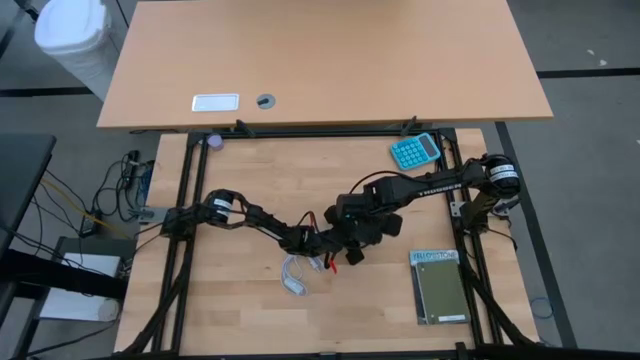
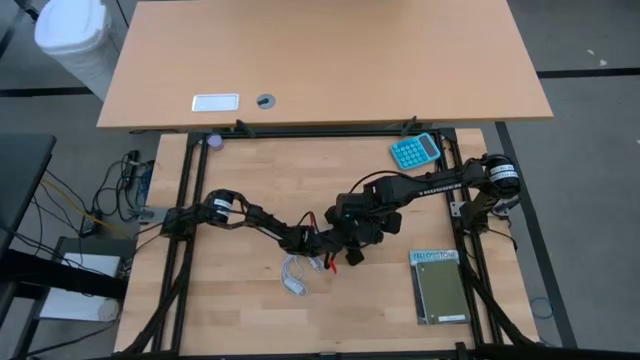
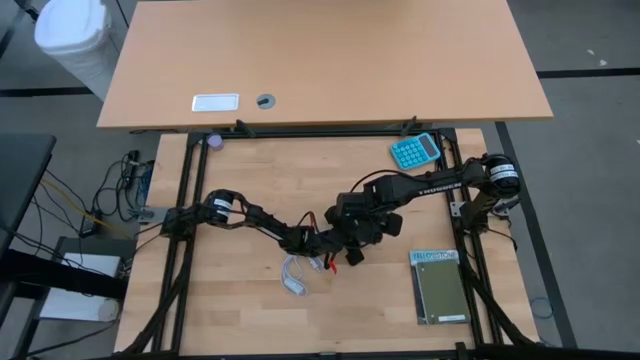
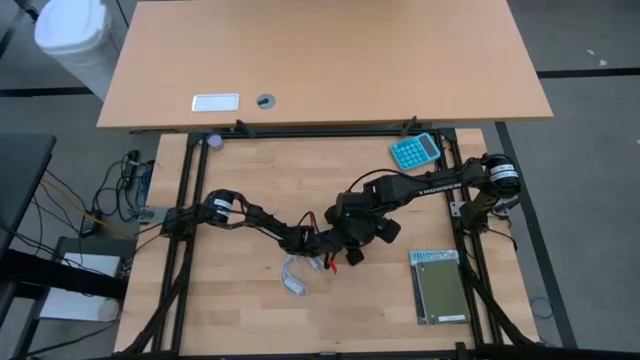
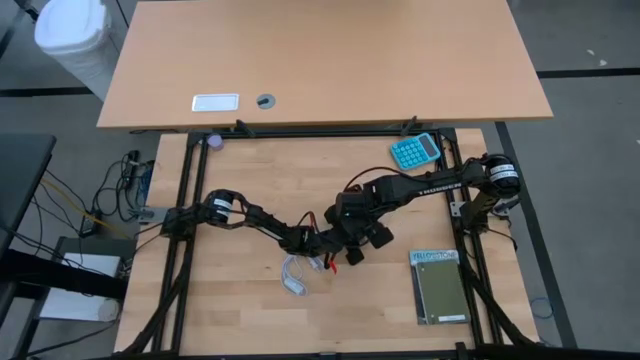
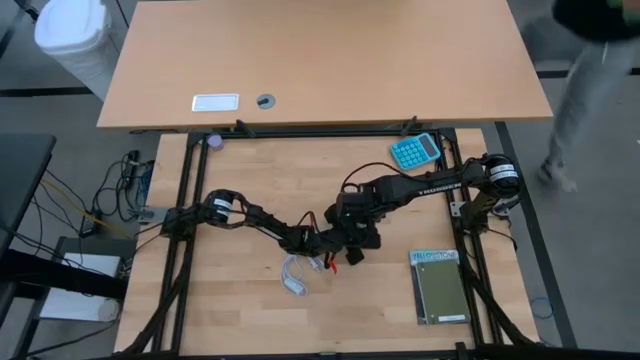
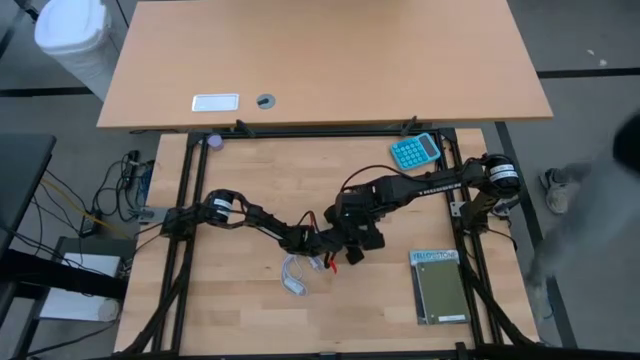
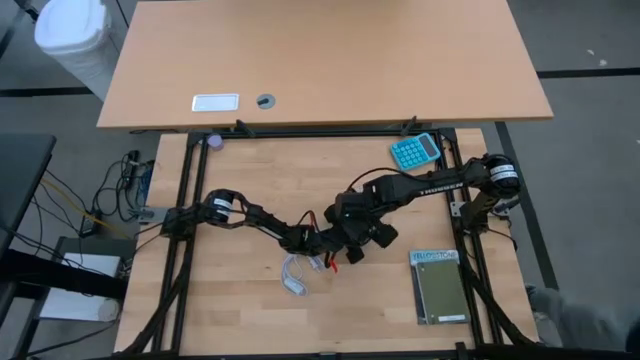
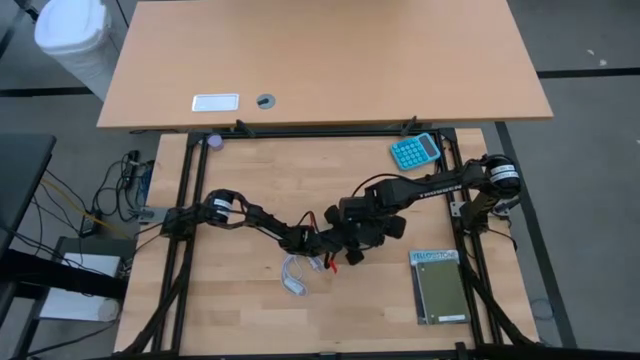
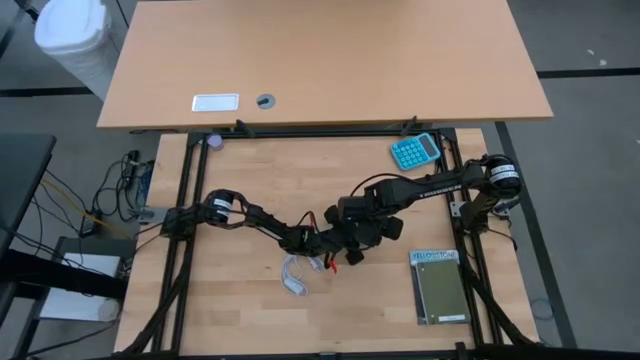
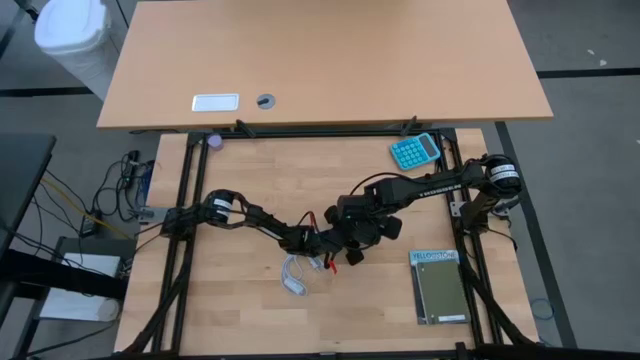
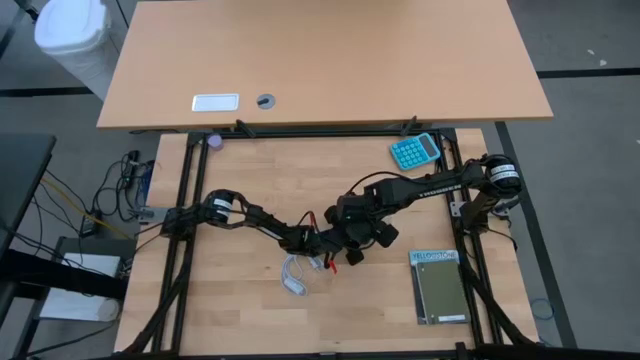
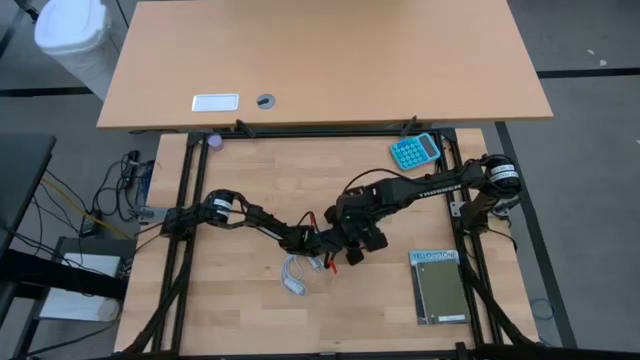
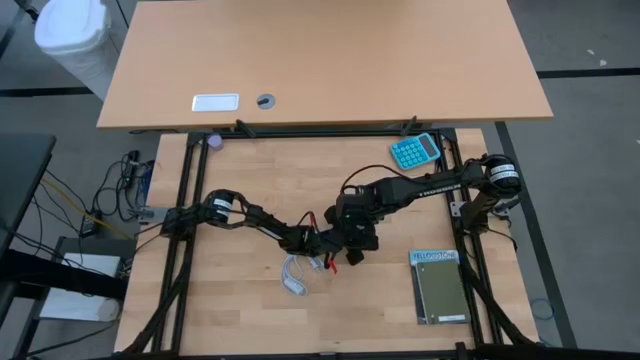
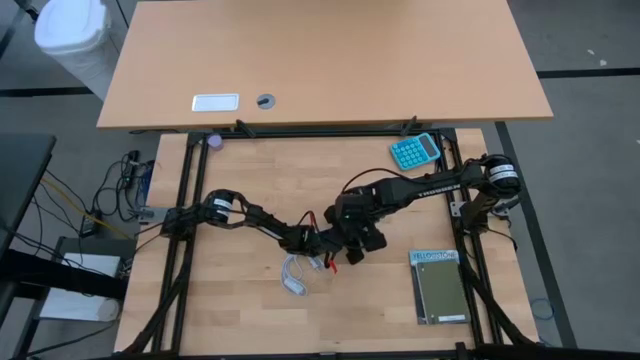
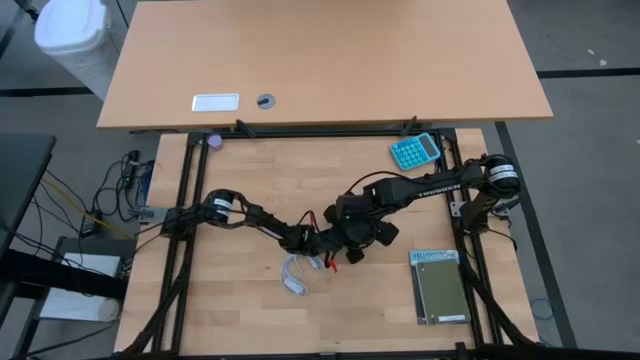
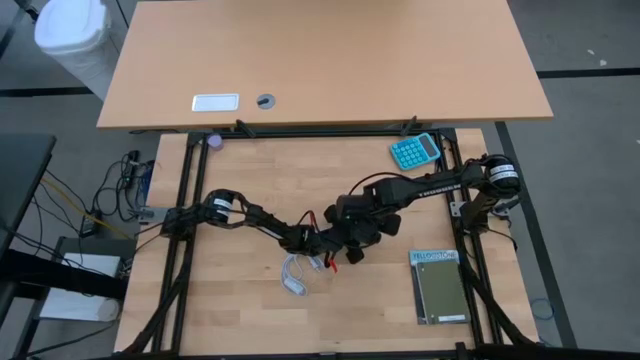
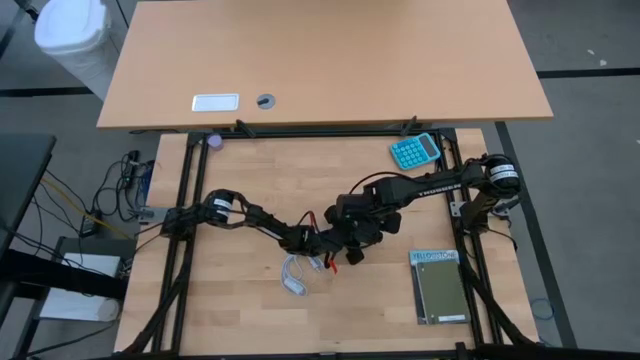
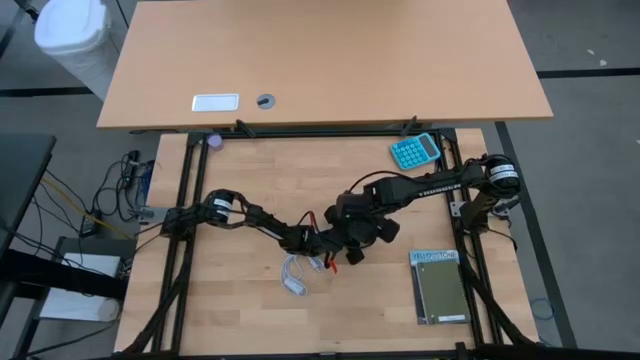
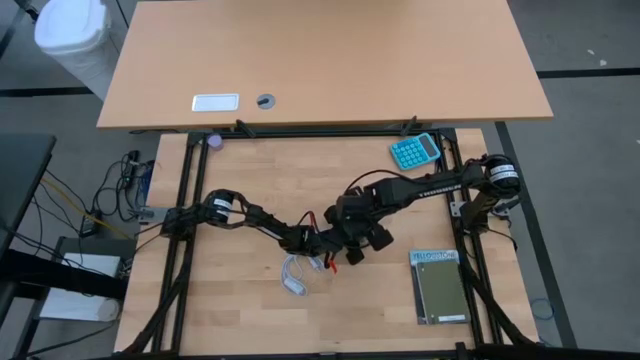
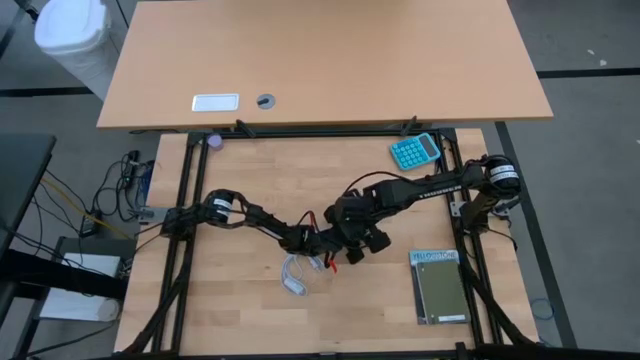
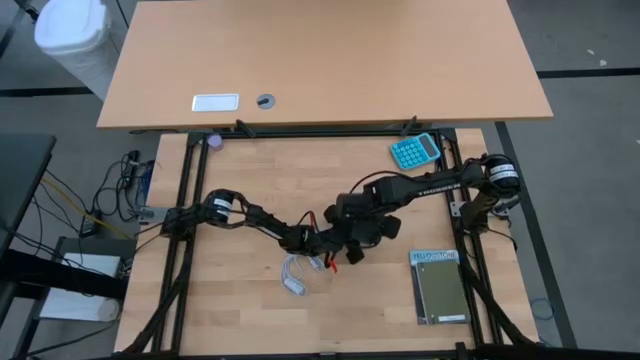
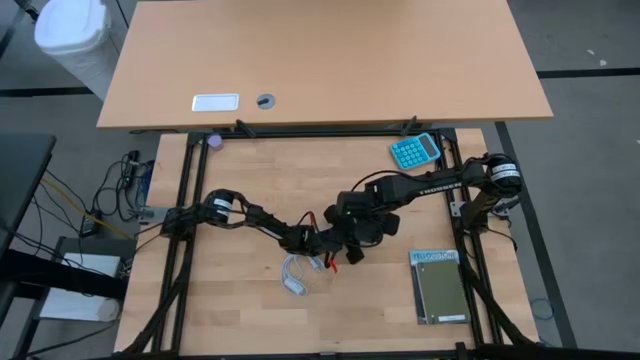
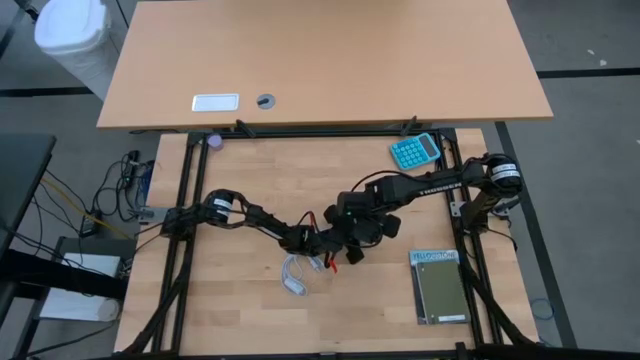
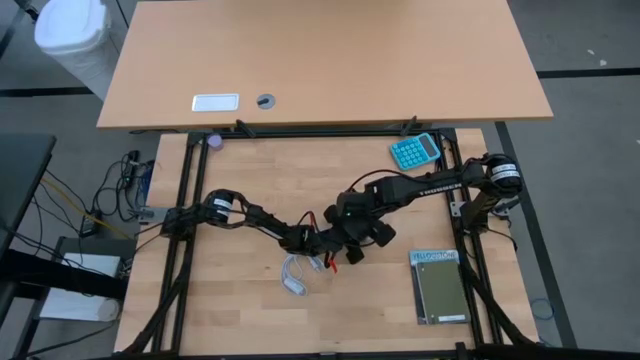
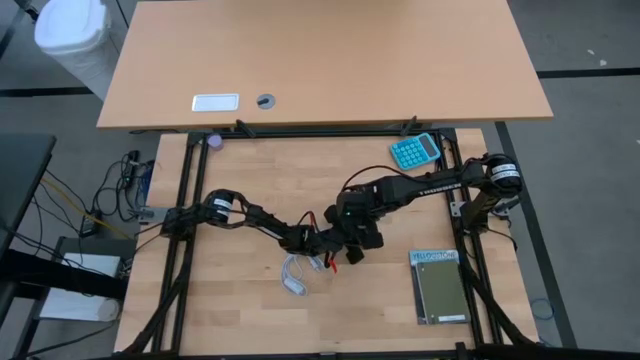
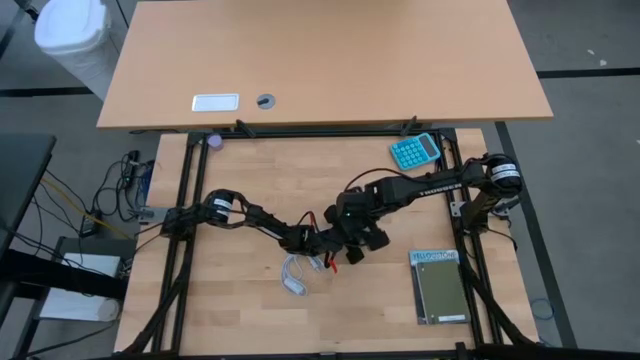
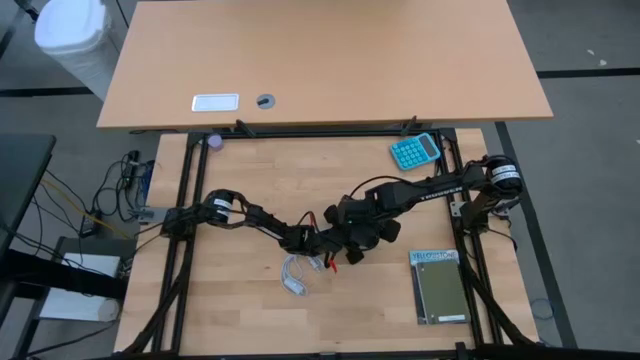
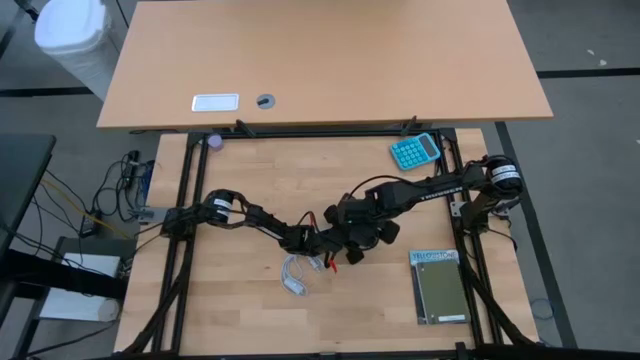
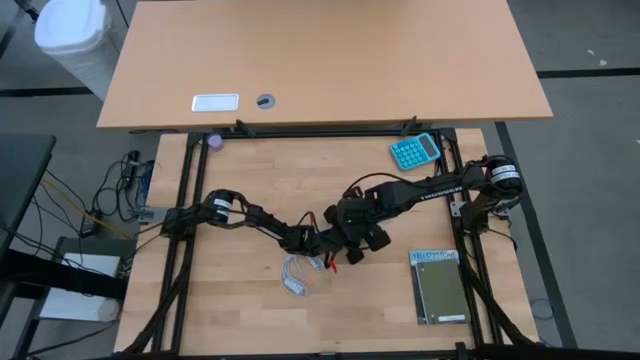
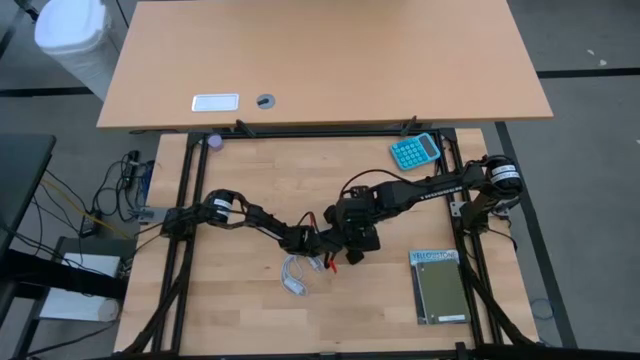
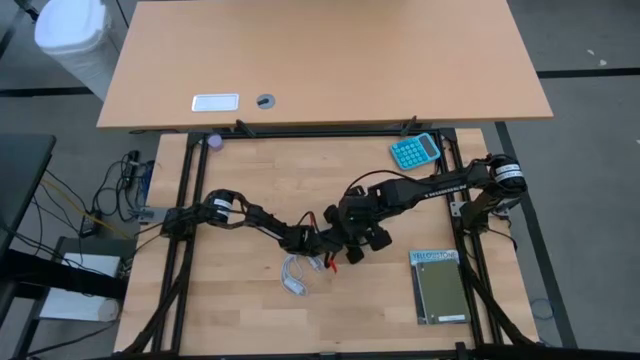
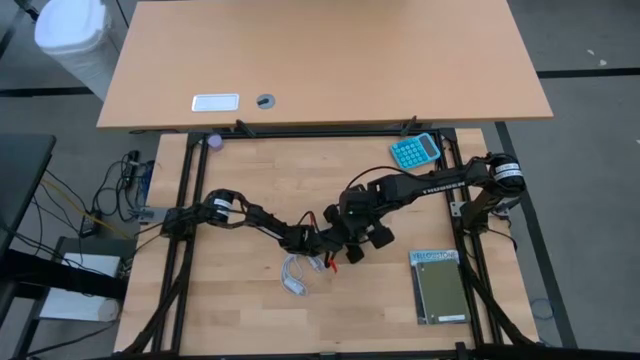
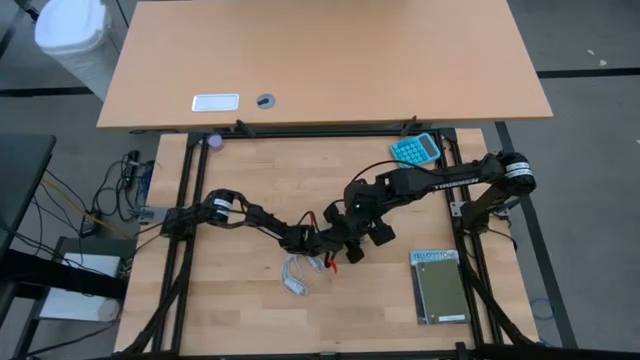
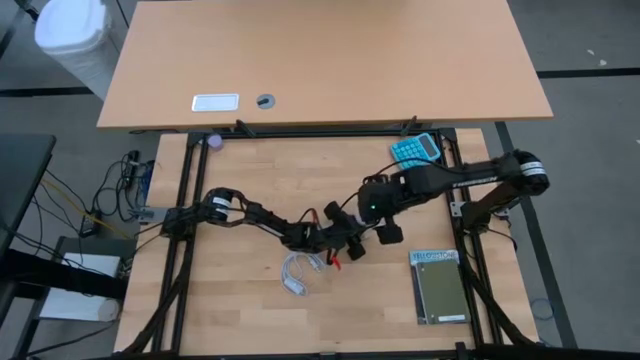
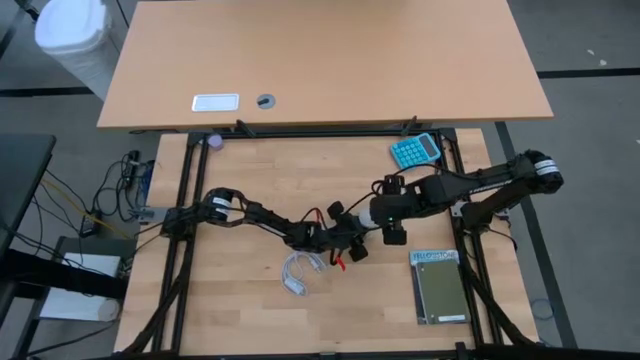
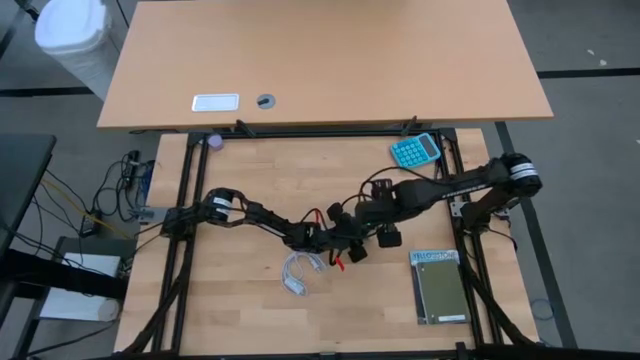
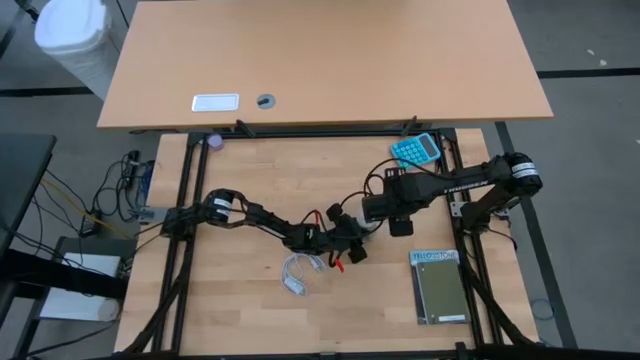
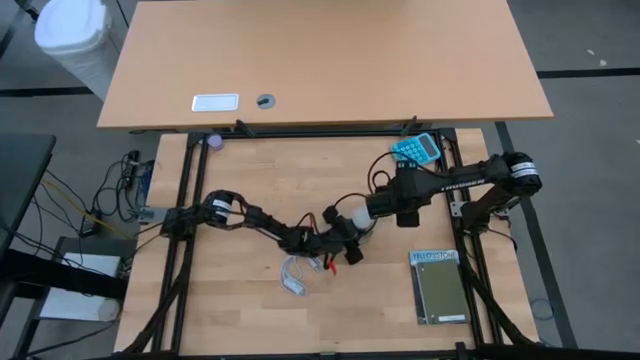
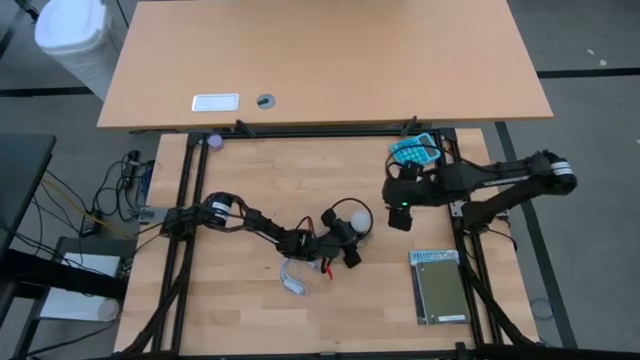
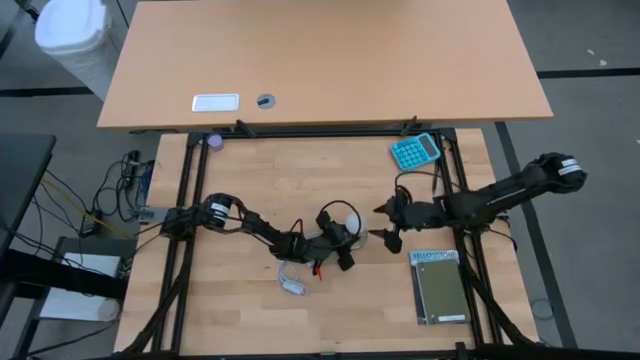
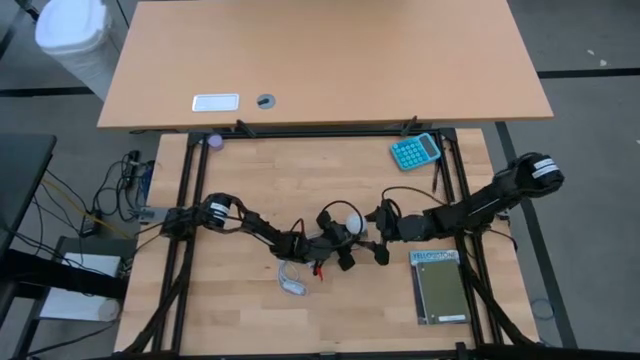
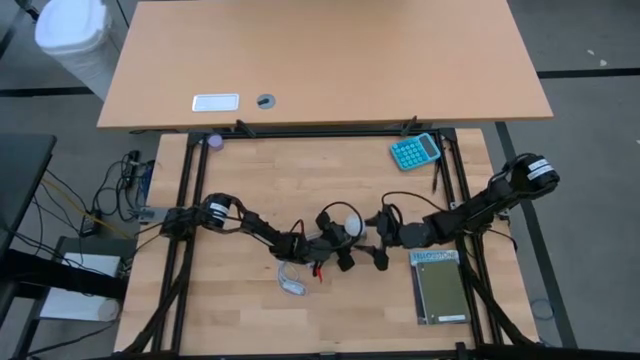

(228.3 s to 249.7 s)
Task: Screw lightbulb
Insert the lightbulb into the socket
